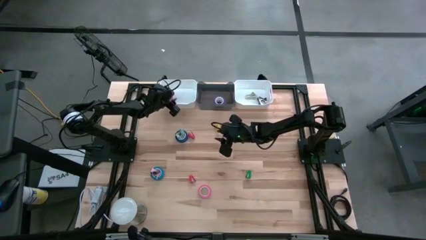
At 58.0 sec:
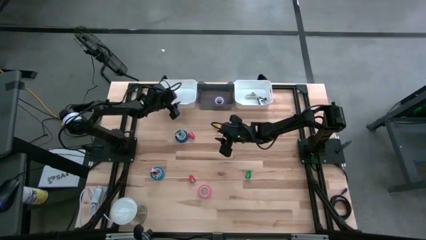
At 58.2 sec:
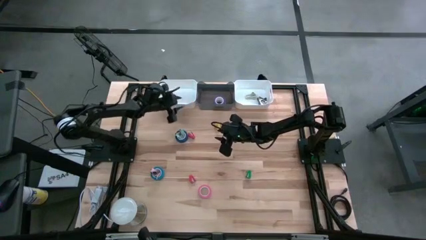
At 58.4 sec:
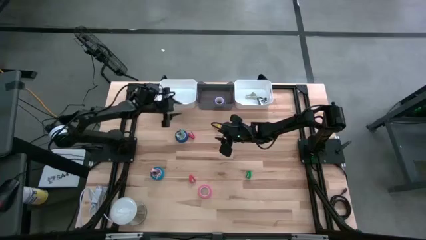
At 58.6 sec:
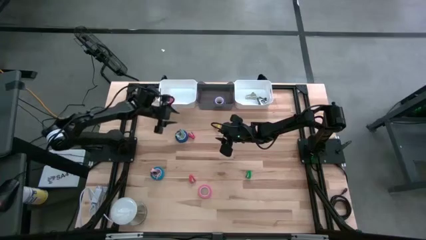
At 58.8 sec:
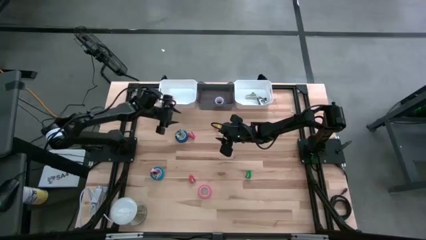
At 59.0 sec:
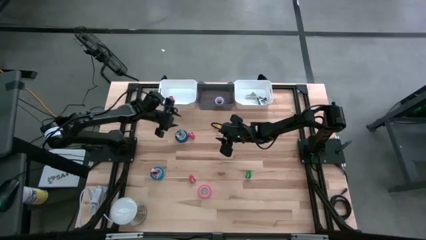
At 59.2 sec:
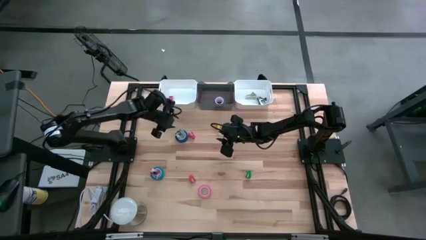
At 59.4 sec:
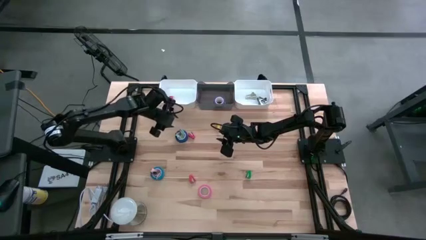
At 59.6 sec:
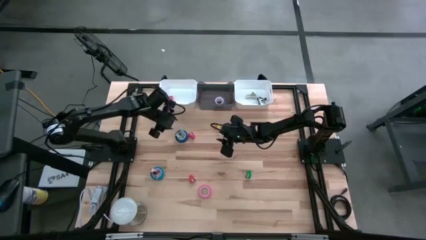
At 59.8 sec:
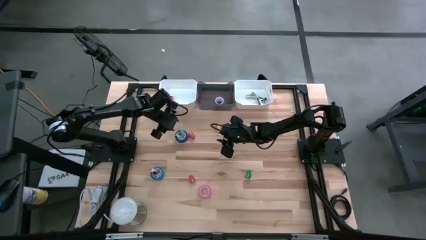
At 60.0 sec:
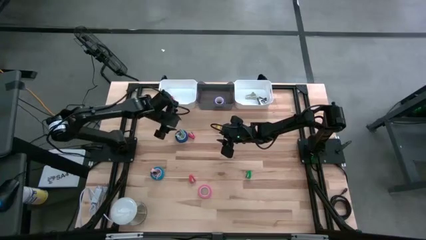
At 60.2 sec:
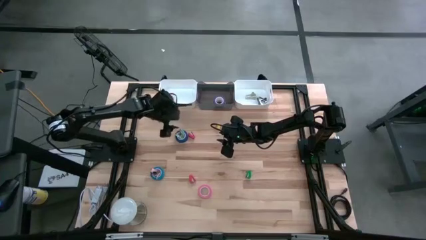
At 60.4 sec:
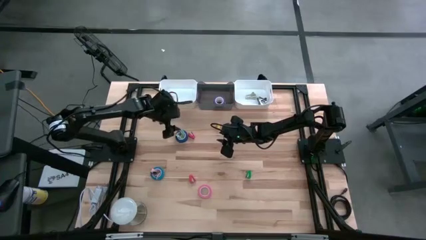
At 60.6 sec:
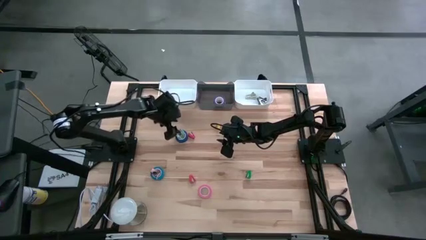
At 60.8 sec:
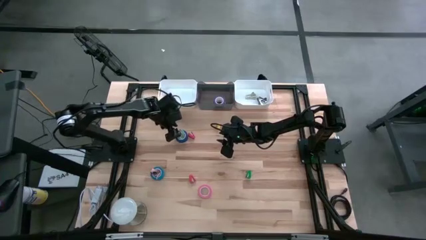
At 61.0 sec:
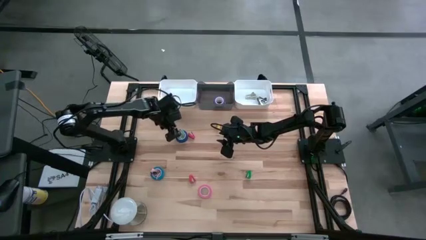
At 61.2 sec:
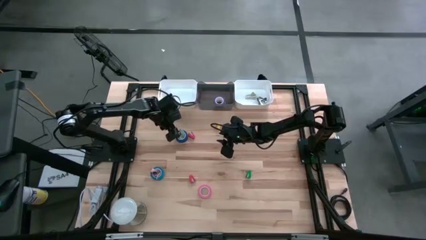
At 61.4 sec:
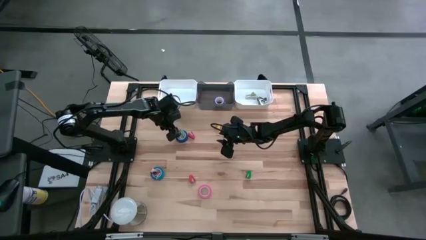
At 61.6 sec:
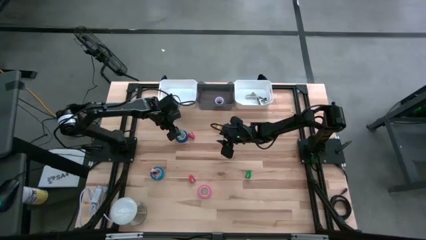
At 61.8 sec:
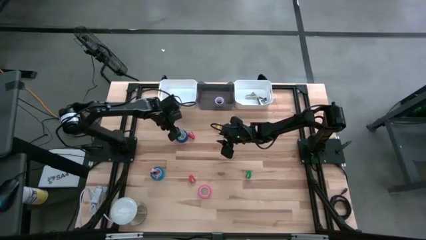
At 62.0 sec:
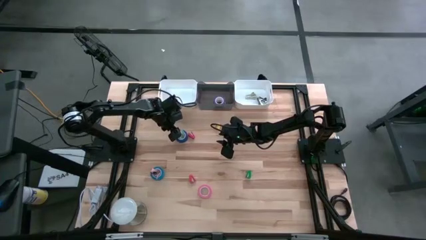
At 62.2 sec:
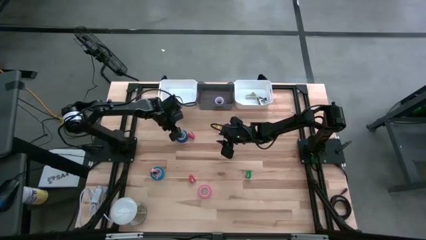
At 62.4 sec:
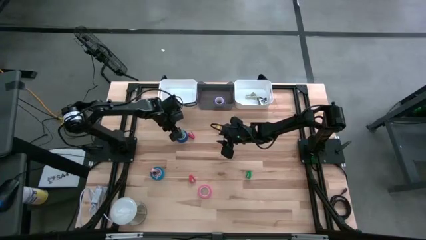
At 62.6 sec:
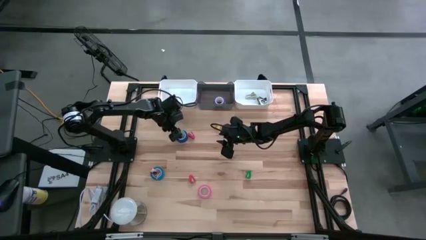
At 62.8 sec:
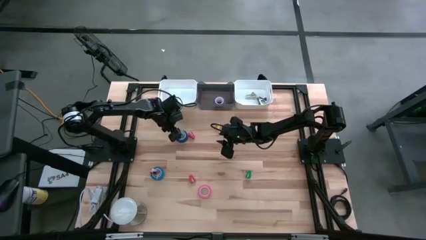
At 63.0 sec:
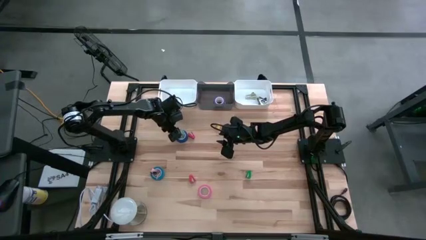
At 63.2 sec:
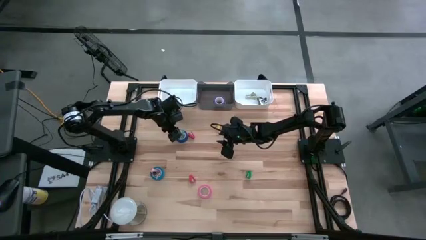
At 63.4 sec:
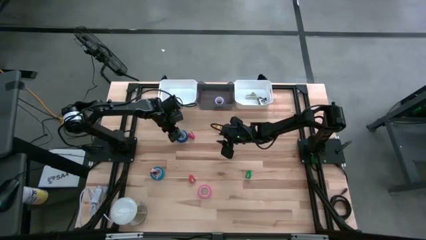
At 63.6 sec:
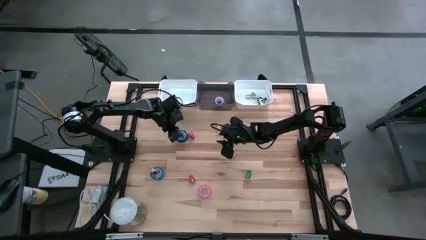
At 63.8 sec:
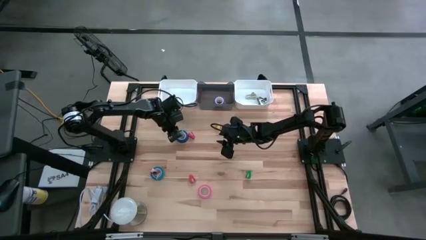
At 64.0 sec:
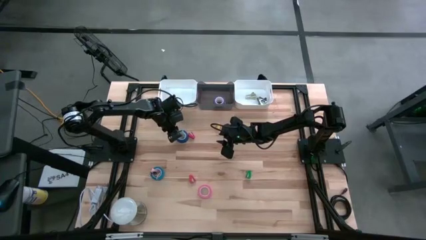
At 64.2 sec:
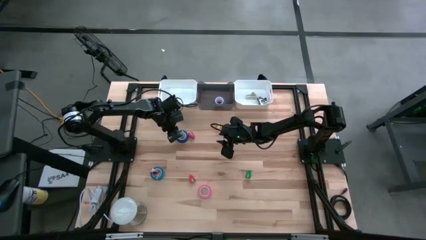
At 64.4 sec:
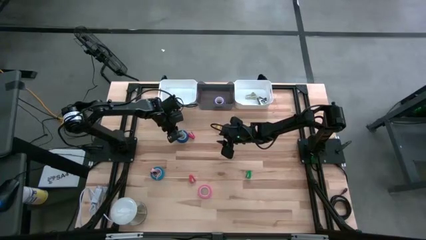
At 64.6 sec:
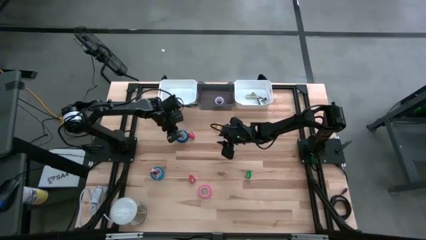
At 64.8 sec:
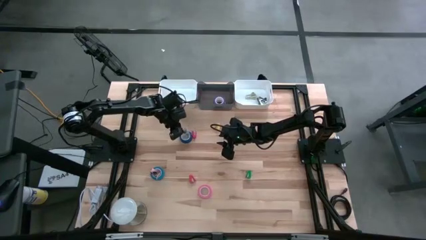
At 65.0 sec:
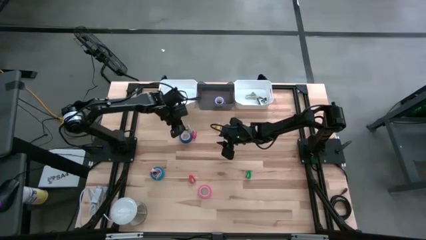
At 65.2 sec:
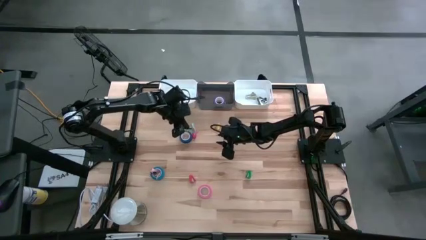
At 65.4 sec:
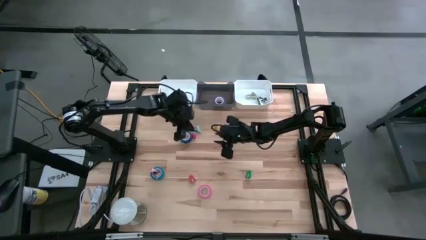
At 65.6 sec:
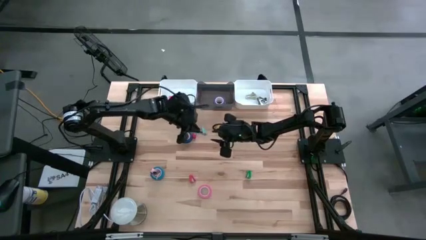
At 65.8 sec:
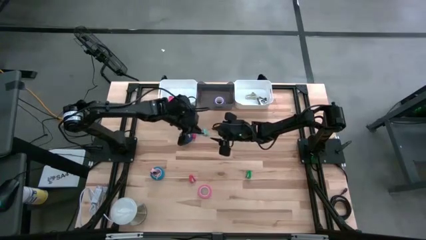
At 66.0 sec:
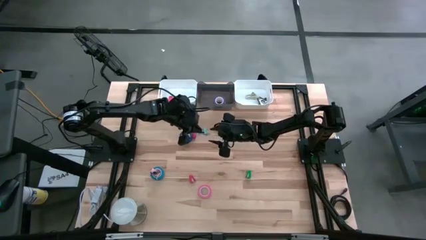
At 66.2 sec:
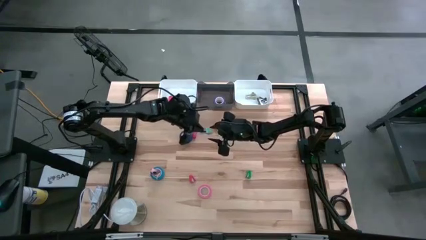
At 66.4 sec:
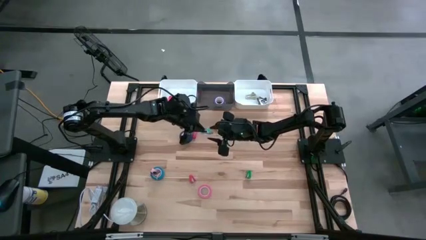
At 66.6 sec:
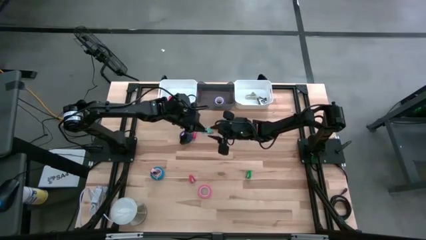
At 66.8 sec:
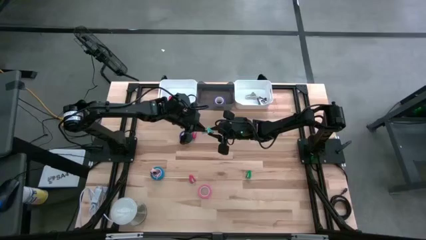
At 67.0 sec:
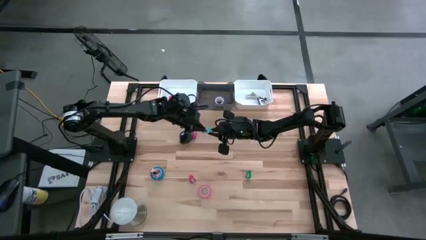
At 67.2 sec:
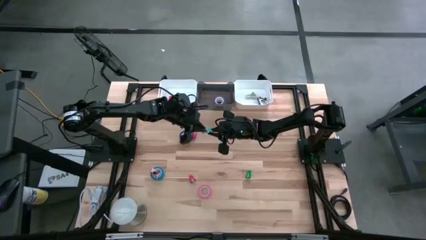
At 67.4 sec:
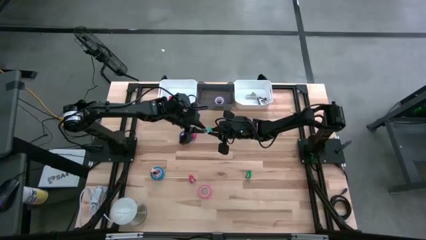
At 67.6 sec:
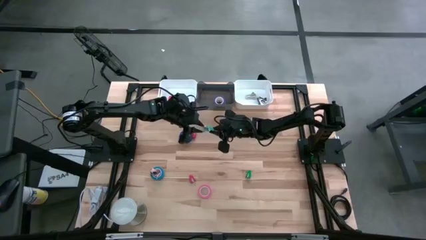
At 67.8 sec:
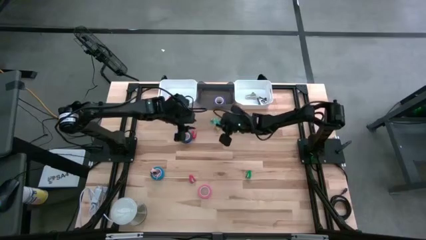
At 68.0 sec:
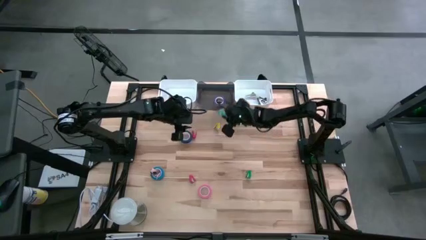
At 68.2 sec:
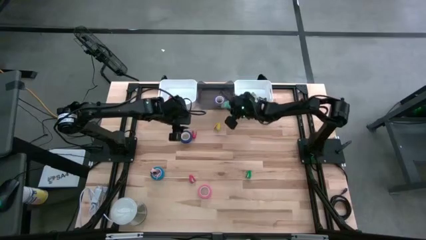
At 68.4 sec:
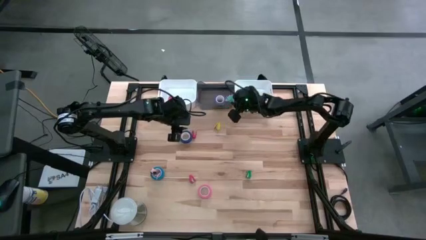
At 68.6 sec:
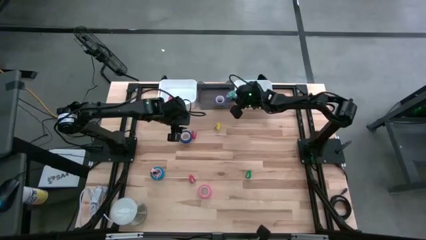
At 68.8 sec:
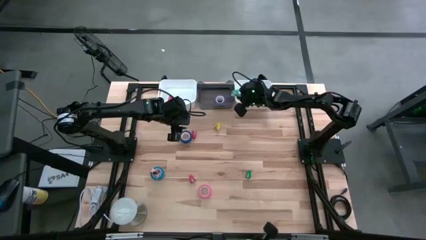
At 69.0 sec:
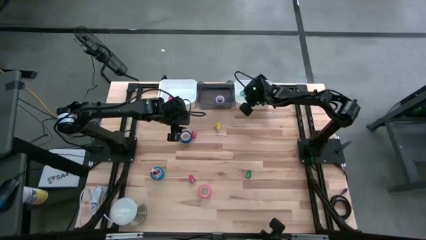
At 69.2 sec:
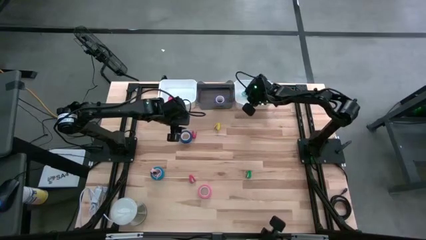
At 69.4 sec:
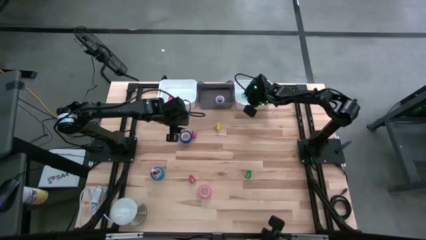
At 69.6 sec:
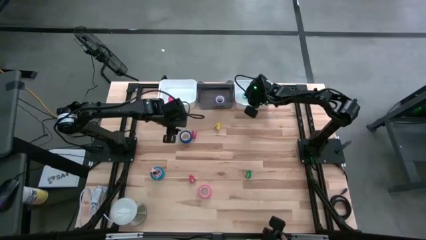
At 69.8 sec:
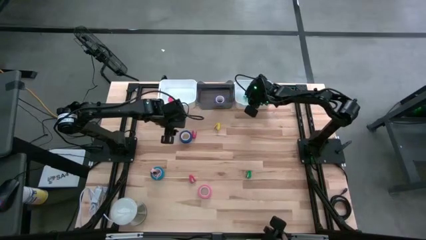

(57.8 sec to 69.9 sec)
Task: Pick and place Stapler, Stapler remover, tape
Put the light blue staple remover into the right white bin

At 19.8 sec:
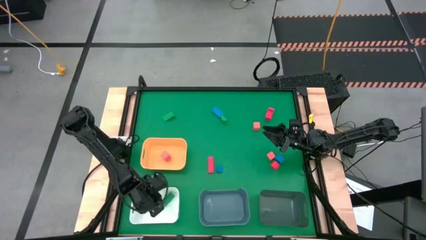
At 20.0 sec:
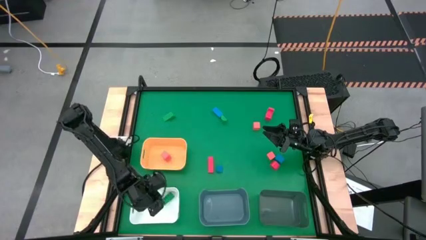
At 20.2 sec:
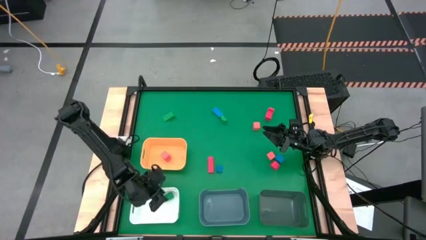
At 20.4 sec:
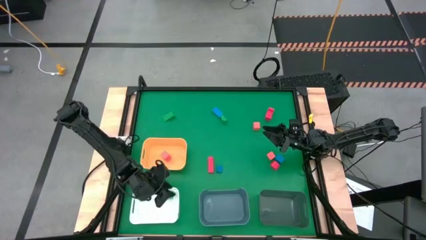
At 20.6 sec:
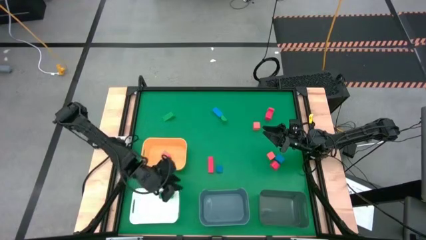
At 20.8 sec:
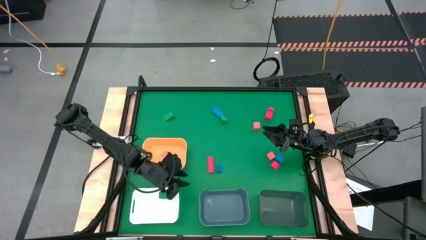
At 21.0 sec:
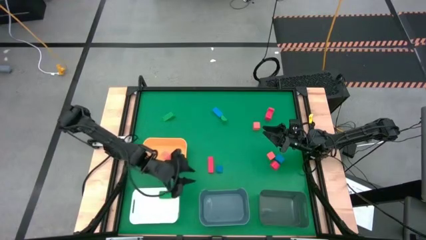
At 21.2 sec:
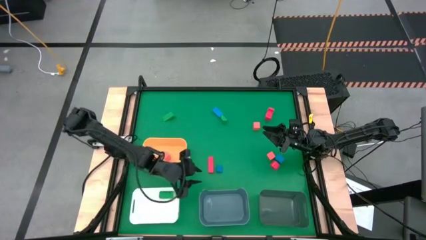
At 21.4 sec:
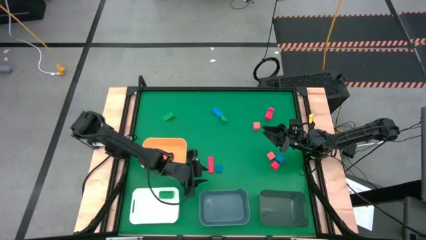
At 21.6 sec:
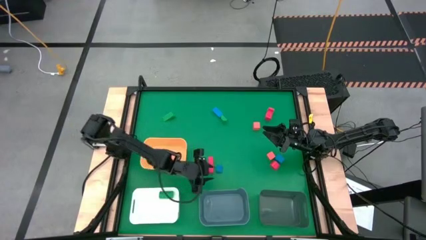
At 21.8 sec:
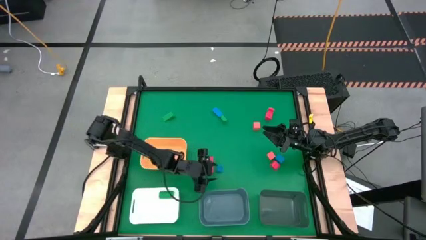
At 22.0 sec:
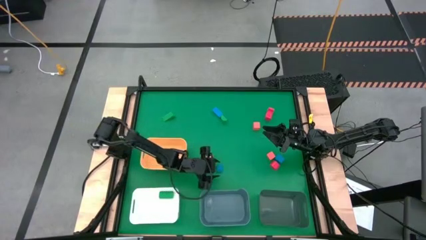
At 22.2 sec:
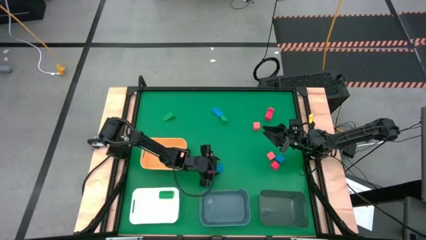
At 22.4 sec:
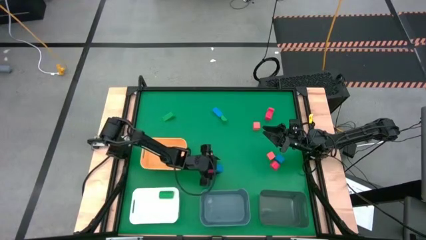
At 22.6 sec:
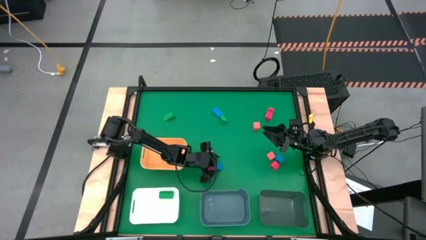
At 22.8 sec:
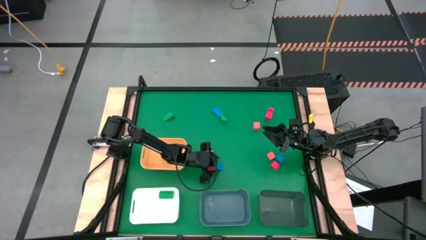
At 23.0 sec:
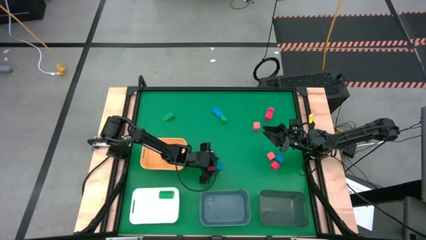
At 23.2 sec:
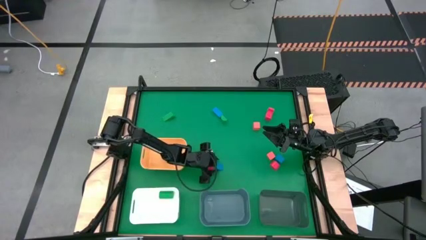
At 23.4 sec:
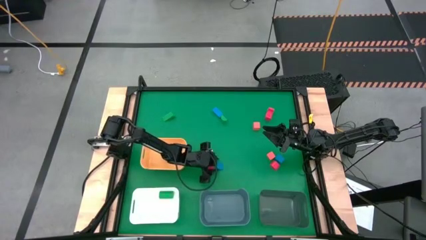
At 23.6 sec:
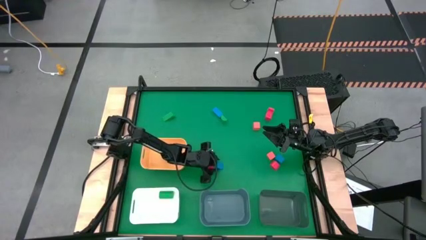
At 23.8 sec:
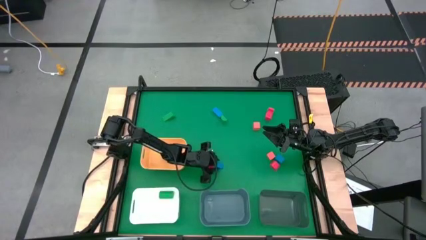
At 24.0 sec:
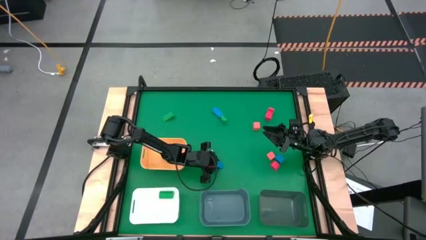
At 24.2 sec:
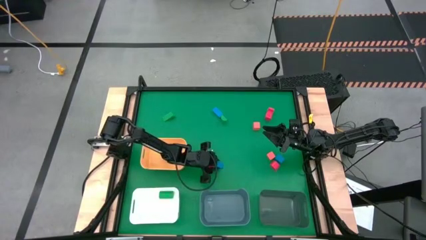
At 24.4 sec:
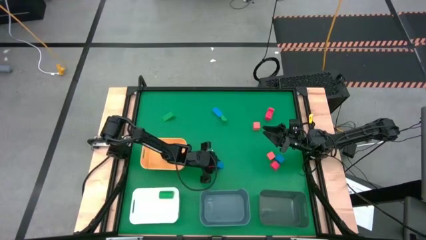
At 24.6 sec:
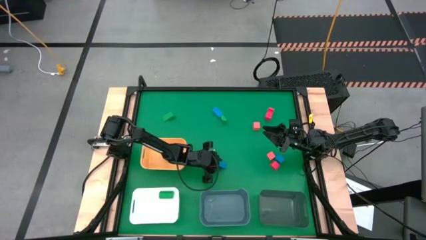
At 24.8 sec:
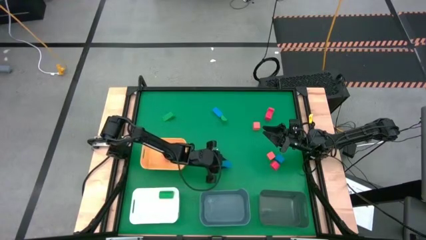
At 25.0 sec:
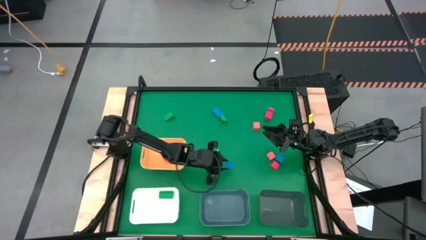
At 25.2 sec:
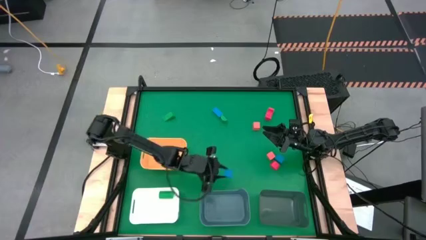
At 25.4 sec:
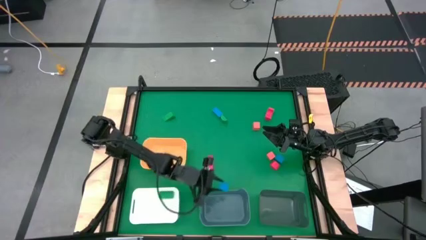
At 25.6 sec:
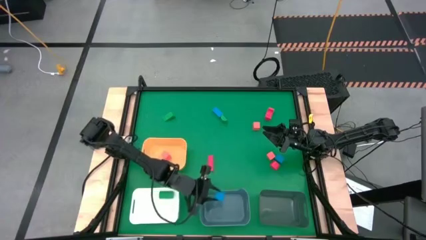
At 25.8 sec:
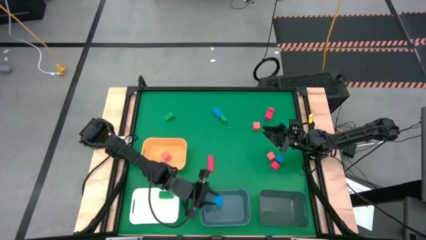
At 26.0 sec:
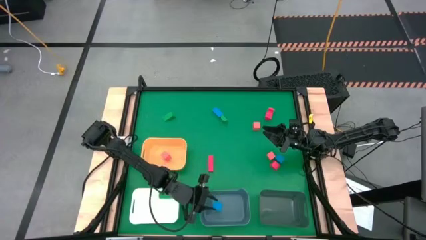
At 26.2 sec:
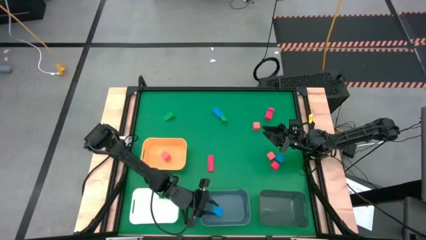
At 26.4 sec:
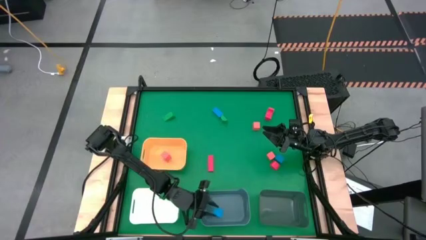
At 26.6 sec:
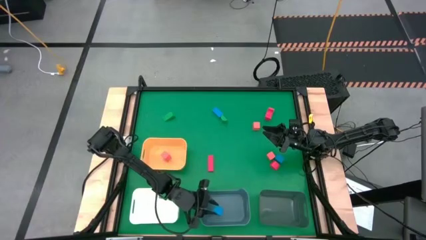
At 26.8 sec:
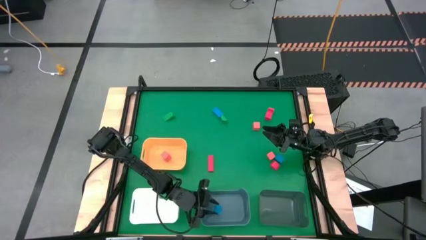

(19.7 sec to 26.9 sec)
Task: Sort & place blocks by color
Put the bottom left blue block into the blue bin
